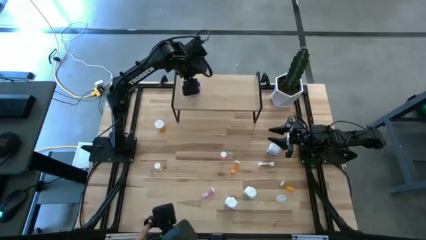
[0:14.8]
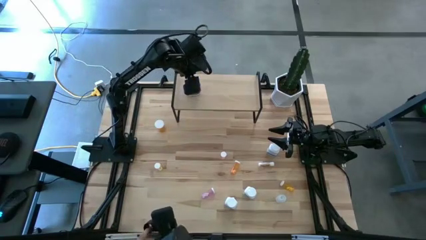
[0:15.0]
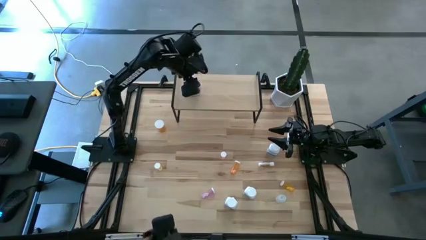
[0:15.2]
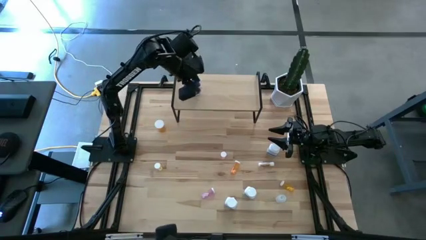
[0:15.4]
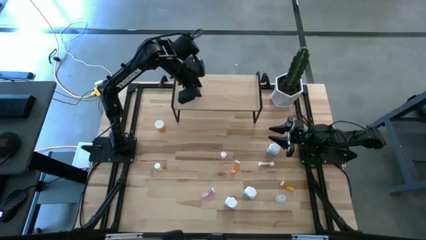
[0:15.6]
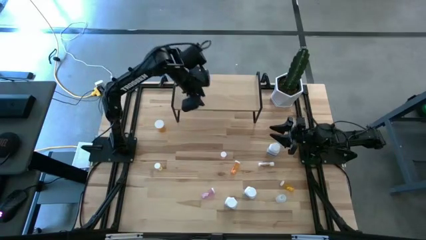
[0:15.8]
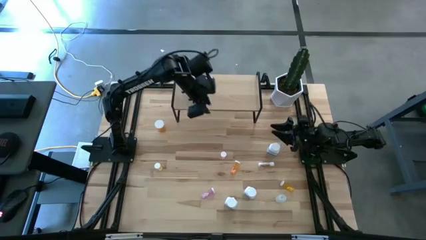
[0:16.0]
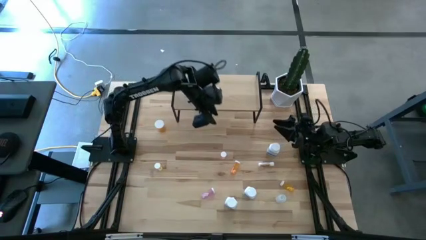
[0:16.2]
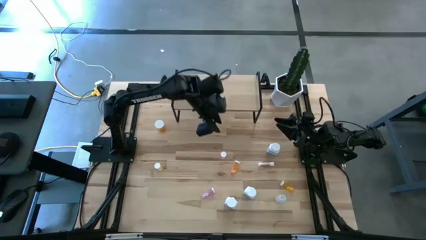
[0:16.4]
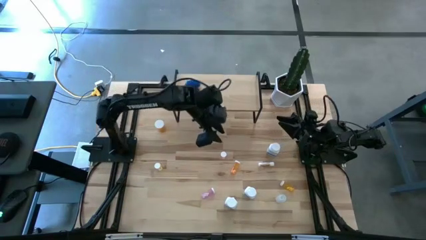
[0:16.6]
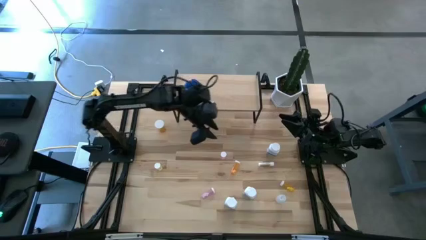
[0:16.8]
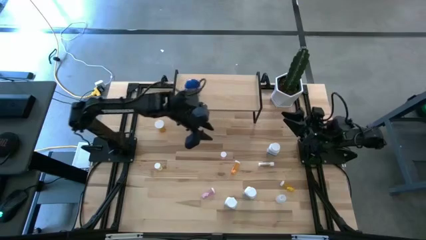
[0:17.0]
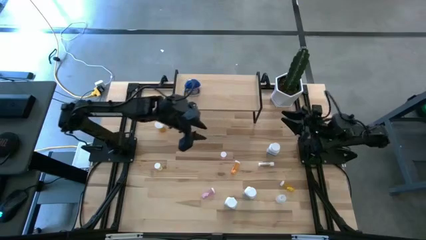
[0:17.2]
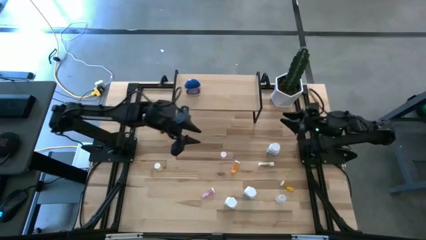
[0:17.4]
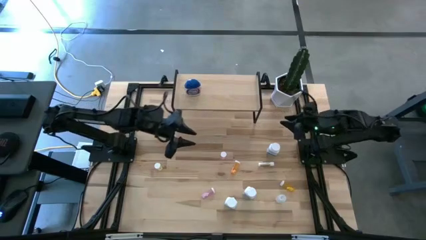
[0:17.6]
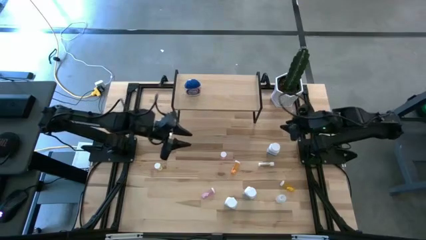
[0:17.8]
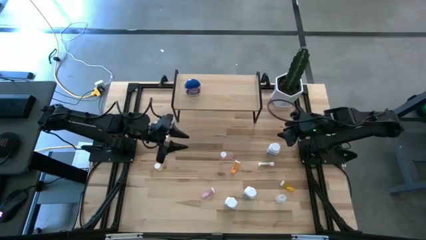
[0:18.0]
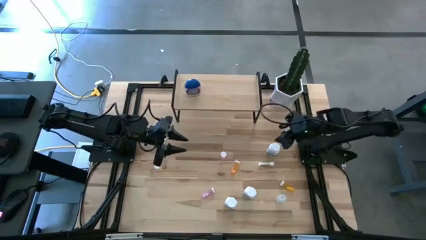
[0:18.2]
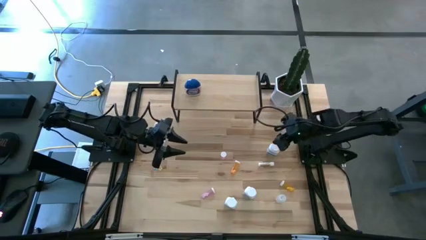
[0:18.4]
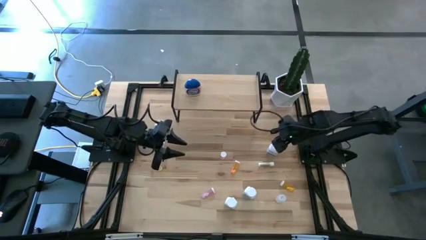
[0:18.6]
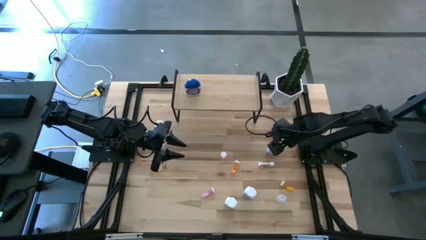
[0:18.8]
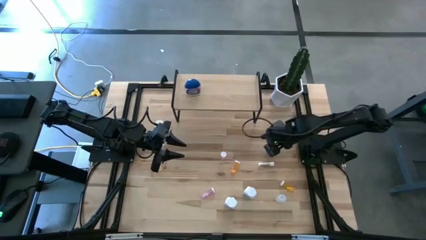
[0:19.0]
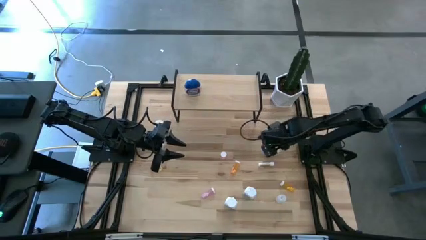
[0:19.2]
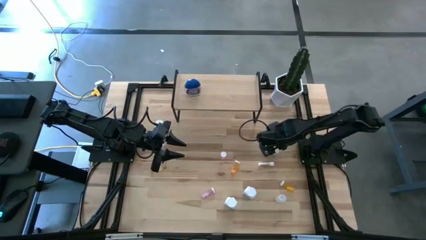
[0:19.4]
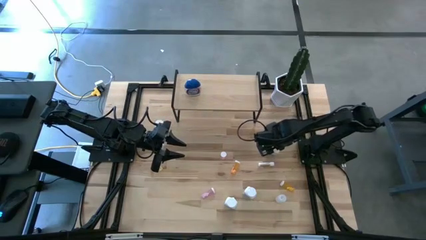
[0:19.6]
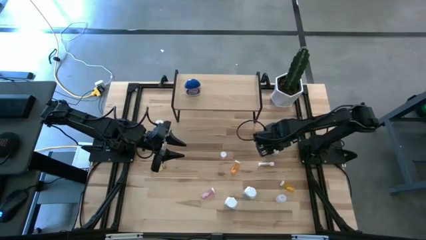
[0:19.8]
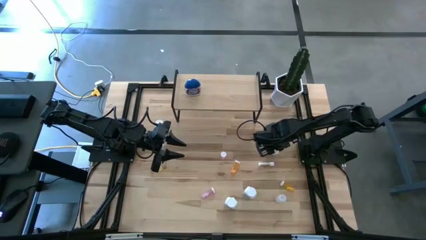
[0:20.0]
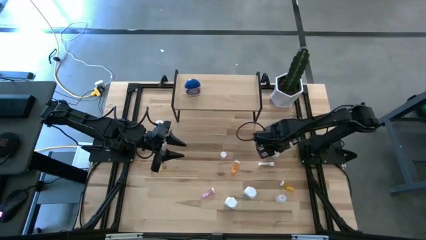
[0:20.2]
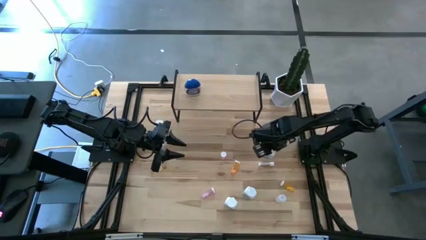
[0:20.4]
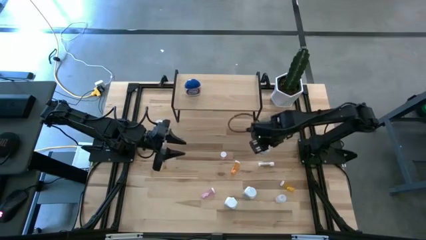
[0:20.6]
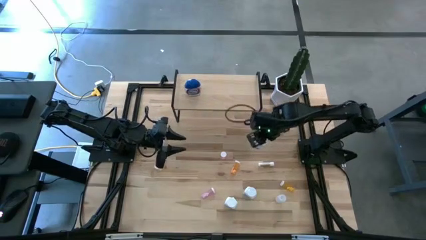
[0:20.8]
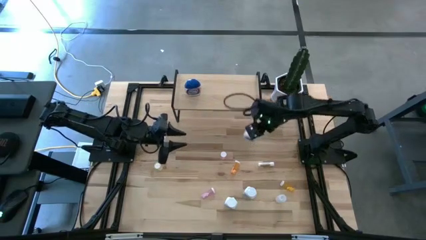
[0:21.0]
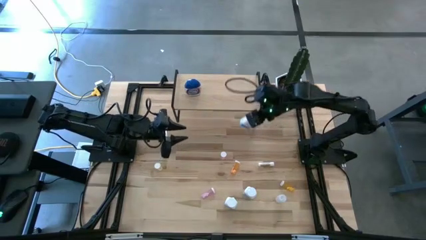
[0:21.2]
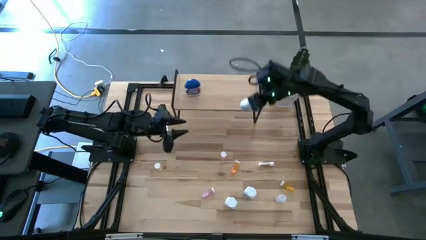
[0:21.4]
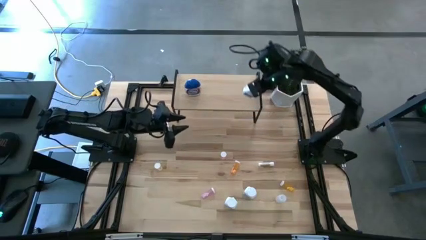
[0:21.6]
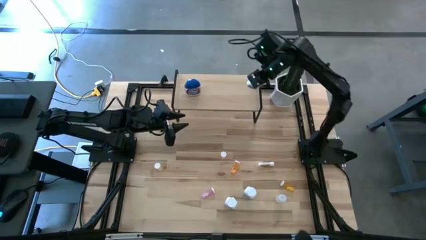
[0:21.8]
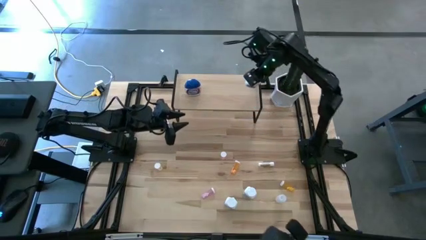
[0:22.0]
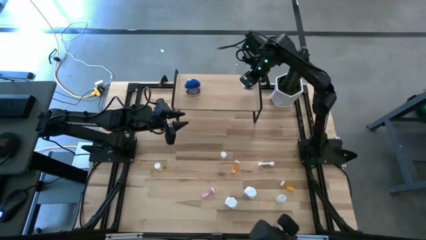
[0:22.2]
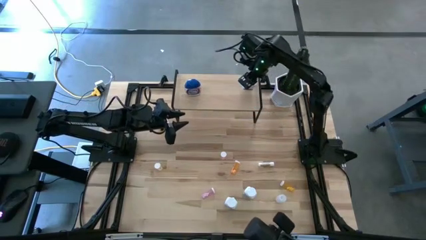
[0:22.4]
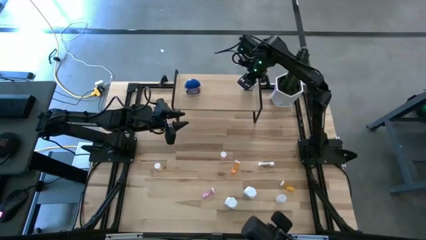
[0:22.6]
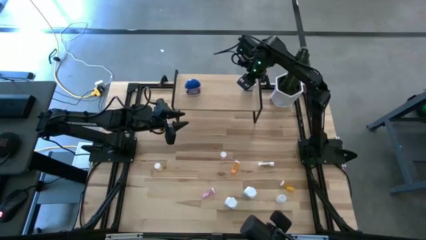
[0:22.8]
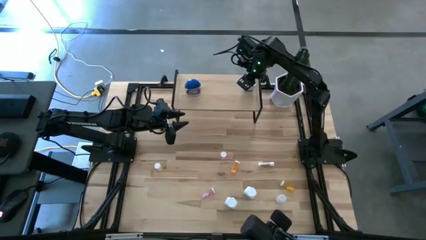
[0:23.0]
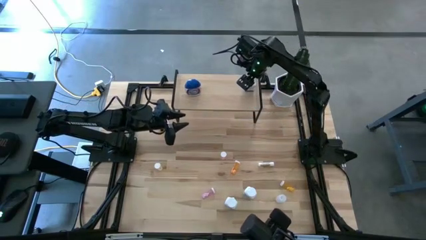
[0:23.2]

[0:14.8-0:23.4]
Task: Pick and place medicine bottles onto shelf by color
Put the top right large white pill bottle on the shelf

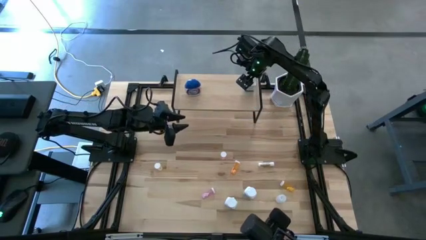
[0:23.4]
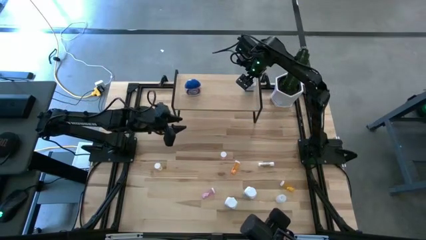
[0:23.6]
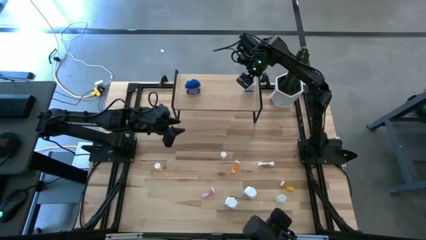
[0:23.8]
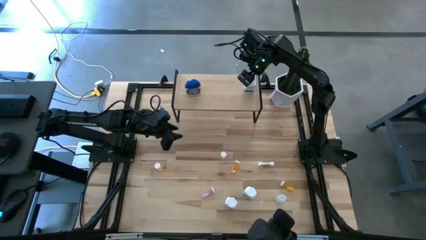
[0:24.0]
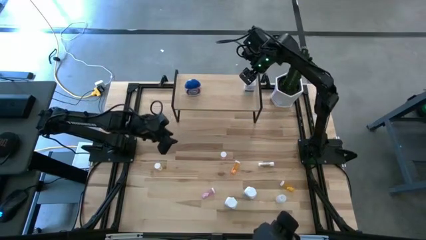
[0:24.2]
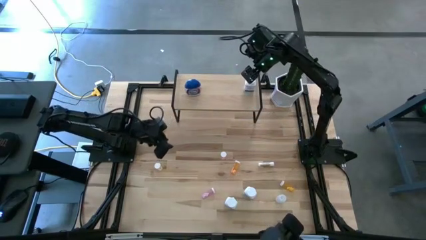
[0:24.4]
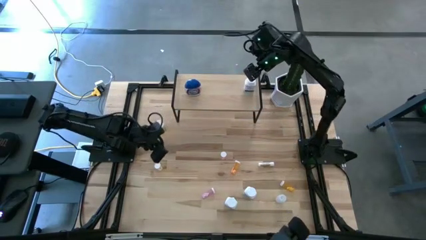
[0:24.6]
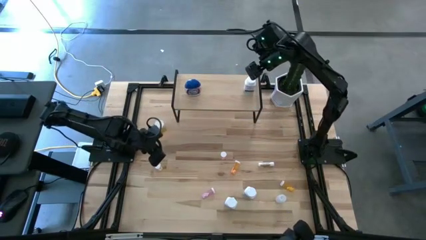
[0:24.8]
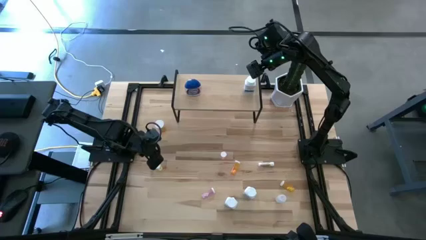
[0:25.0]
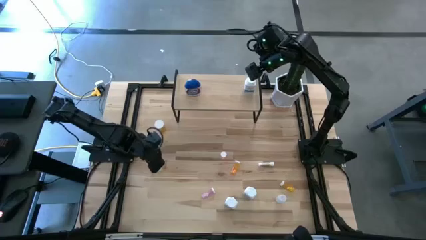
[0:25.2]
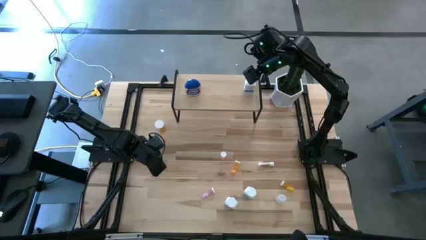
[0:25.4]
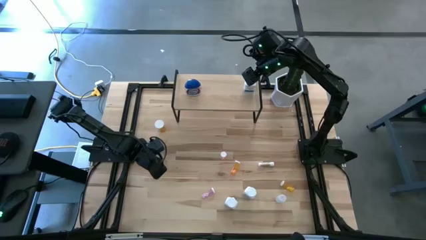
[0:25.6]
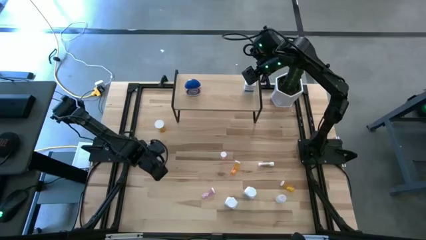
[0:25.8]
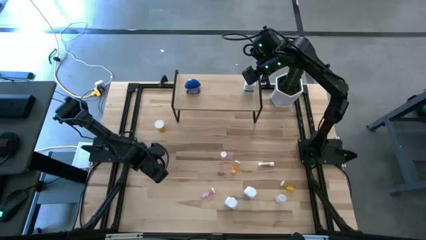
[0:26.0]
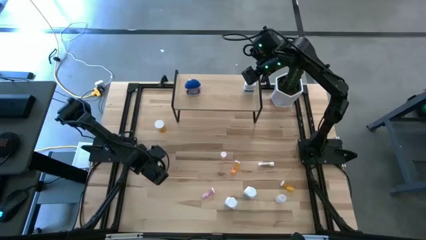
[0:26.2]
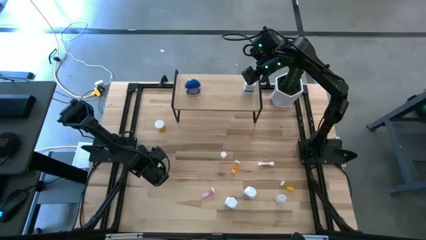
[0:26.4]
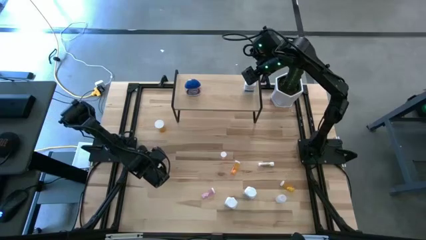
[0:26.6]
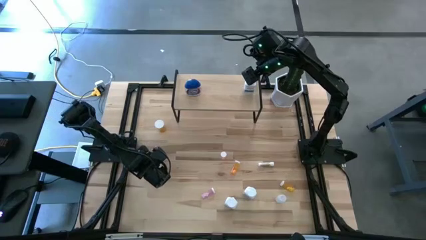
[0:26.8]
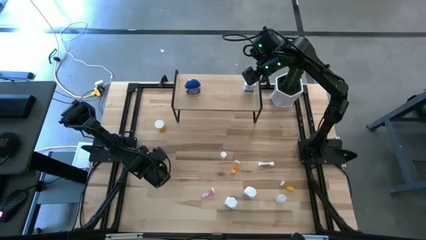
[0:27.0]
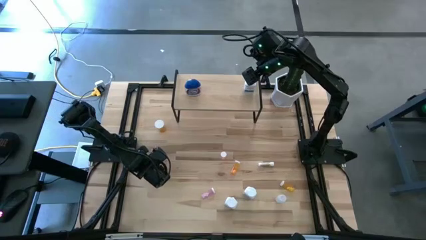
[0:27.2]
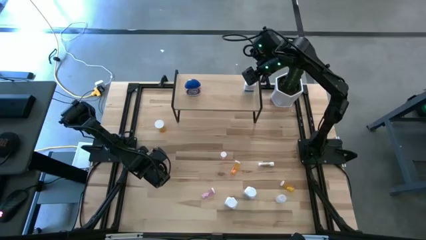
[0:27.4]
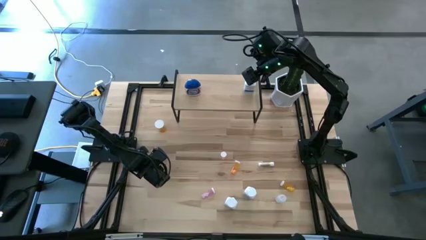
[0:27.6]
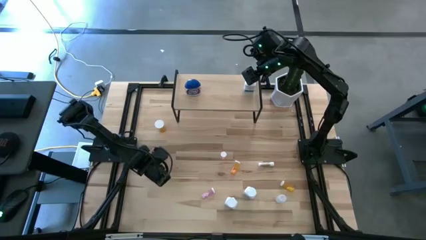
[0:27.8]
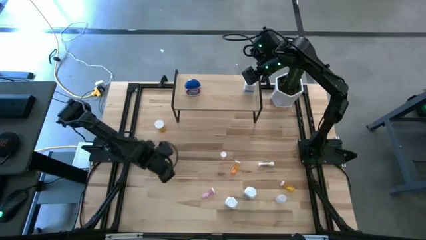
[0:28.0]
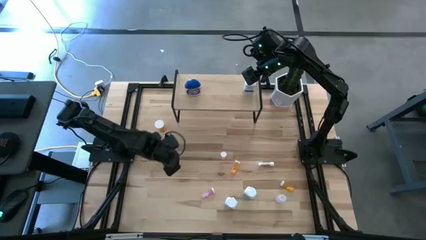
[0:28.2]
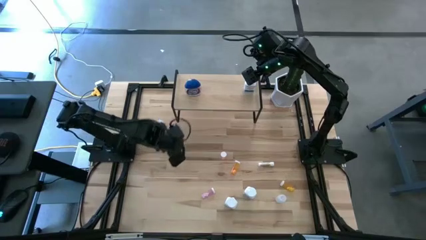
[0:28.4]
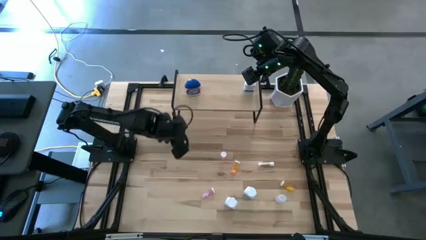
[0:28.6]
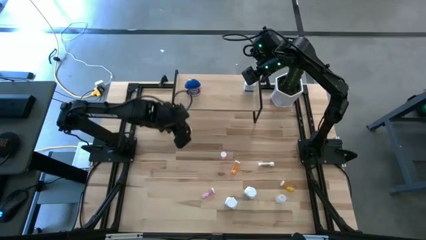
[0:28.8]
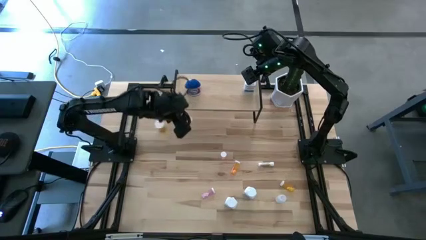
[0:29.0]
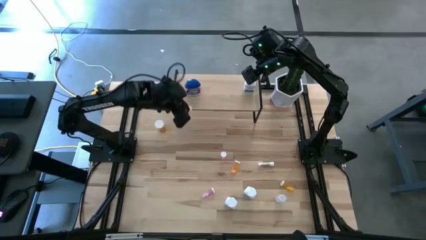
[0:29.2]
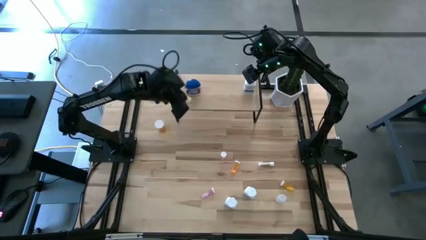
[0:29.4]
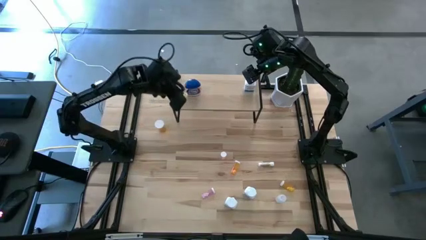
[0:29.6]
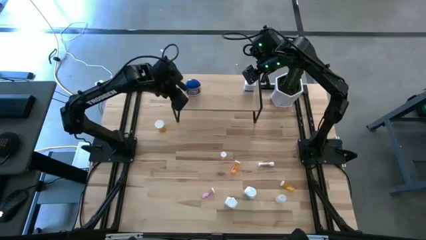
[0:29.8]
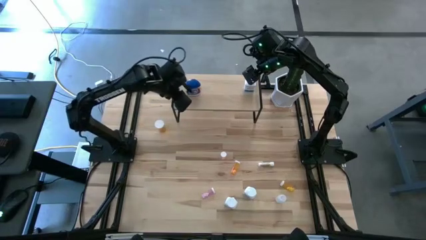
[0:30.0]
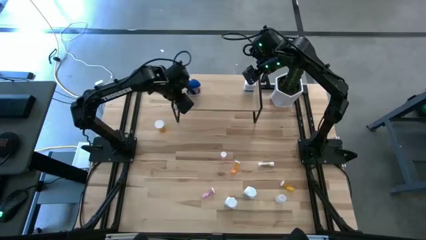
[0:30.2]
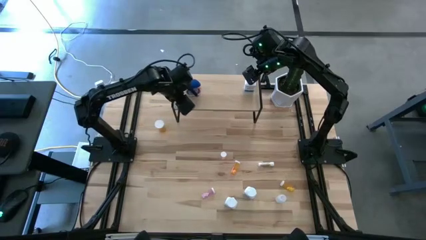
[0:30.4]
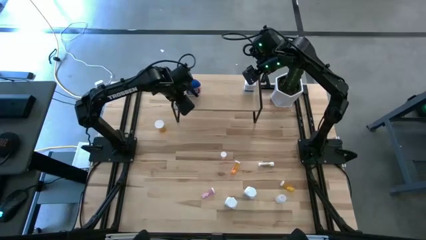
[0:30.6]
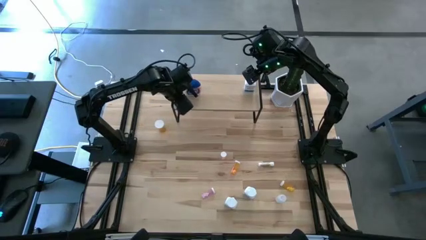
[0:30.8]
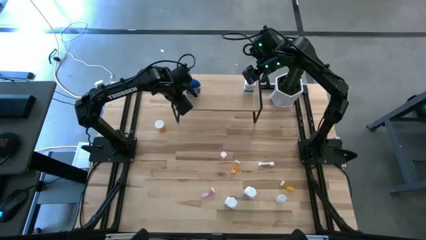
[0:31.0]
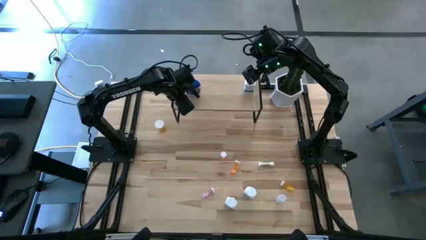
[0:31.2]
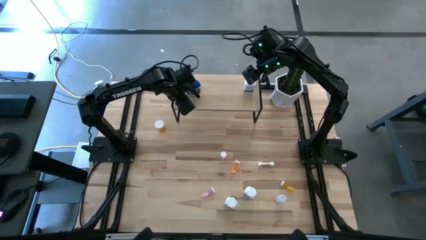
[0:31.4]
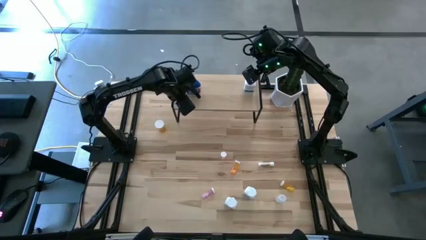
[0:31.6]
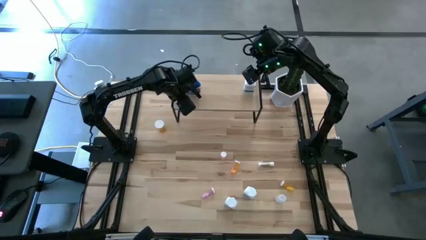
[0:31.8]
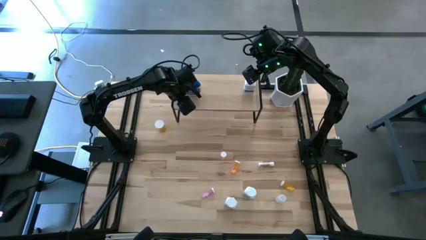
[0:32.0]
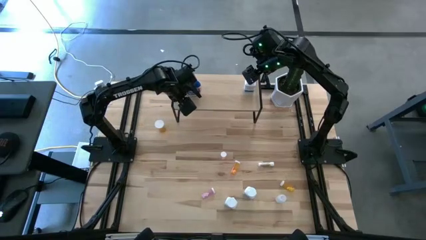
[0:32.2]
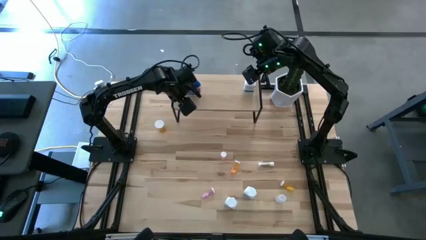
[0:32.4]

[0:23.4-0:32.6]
Put the yellow pill bottle on the shelf
